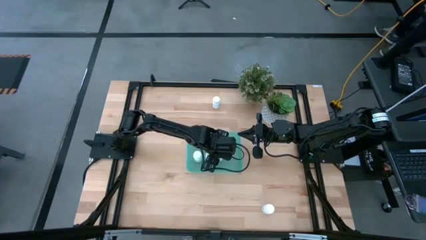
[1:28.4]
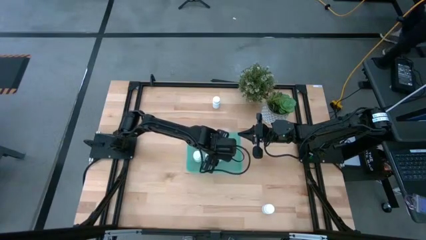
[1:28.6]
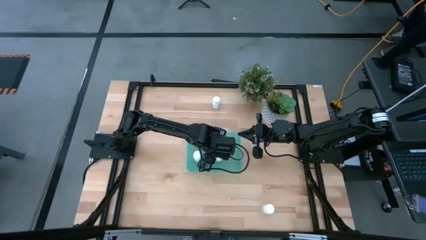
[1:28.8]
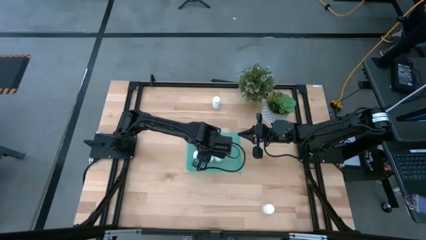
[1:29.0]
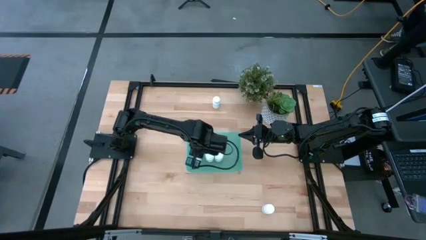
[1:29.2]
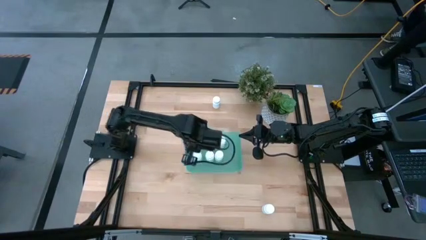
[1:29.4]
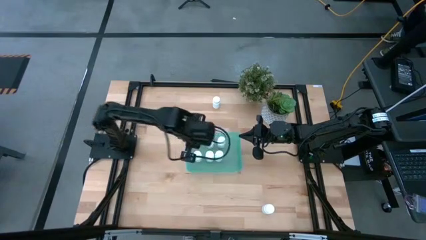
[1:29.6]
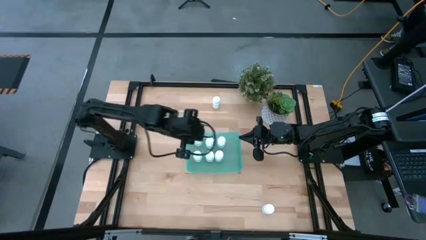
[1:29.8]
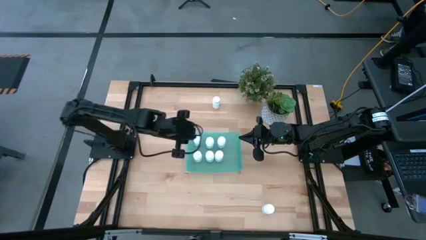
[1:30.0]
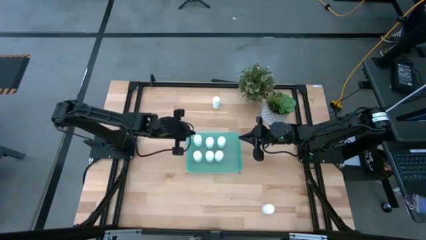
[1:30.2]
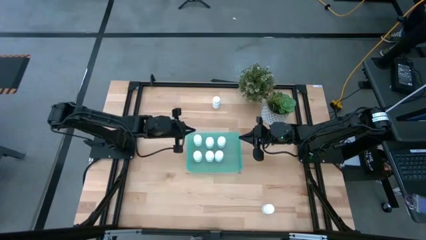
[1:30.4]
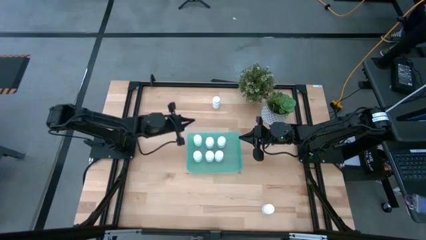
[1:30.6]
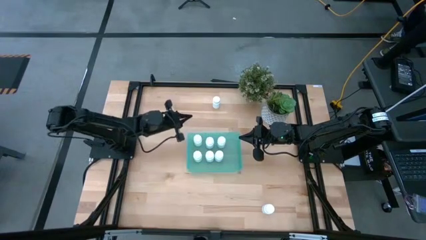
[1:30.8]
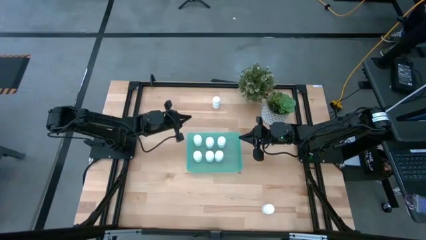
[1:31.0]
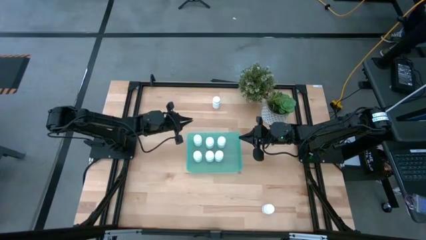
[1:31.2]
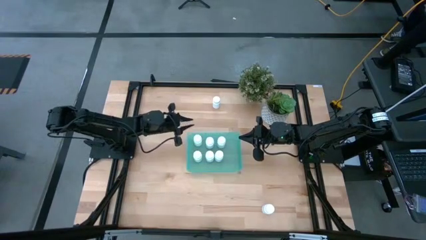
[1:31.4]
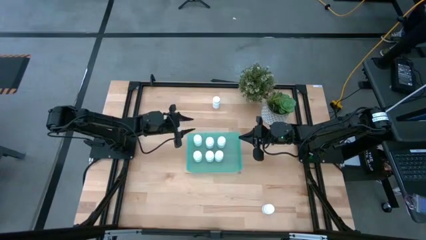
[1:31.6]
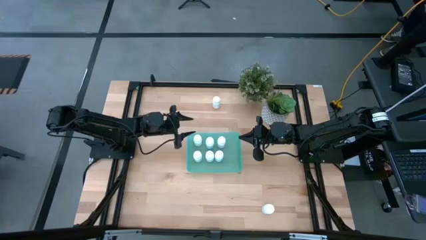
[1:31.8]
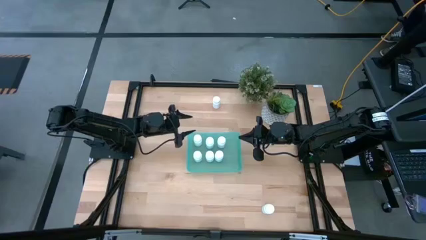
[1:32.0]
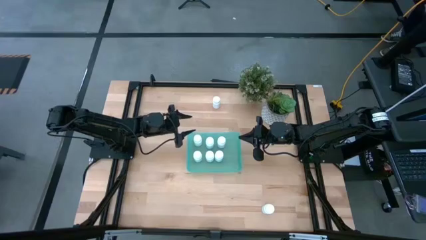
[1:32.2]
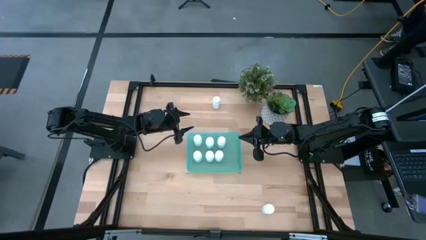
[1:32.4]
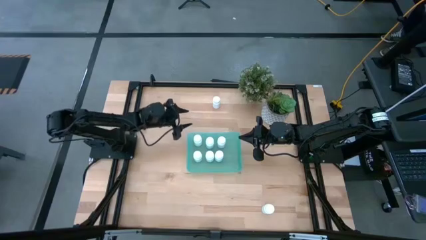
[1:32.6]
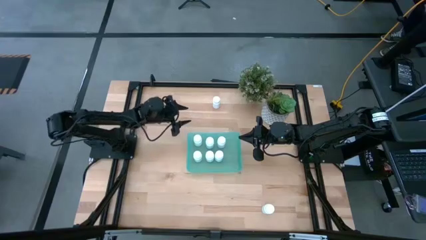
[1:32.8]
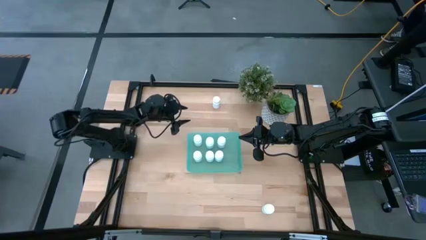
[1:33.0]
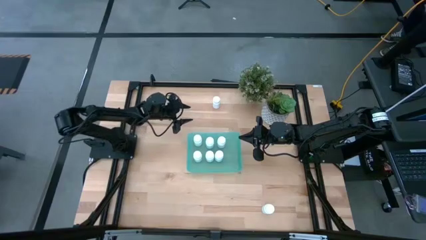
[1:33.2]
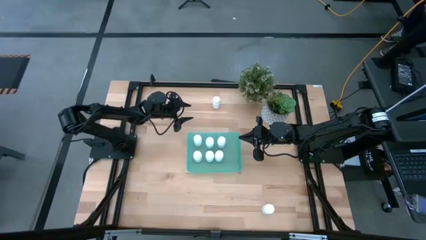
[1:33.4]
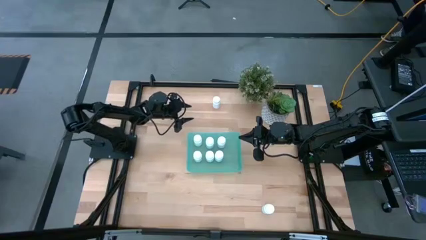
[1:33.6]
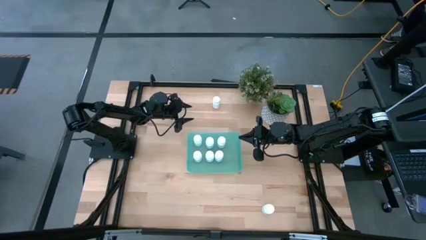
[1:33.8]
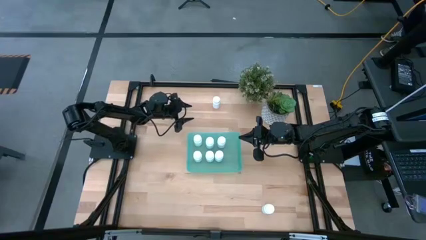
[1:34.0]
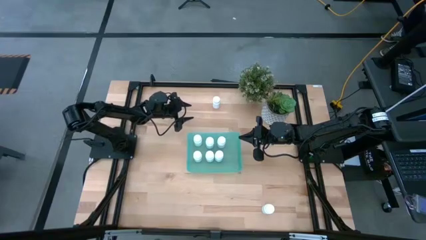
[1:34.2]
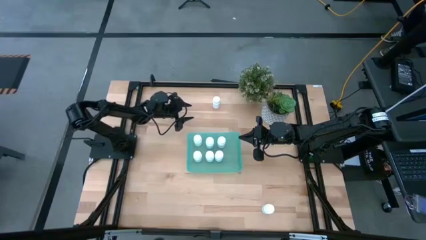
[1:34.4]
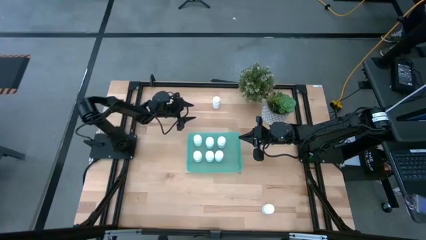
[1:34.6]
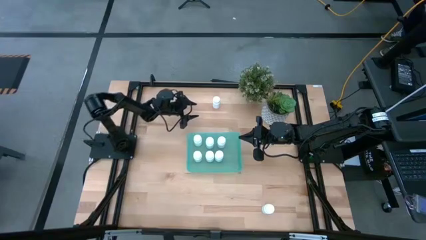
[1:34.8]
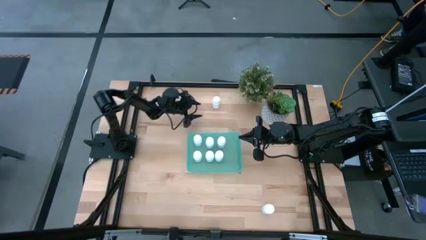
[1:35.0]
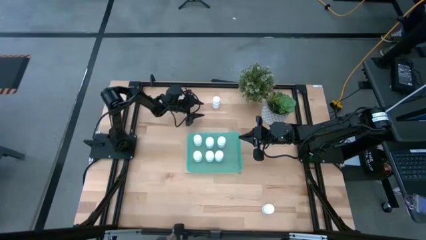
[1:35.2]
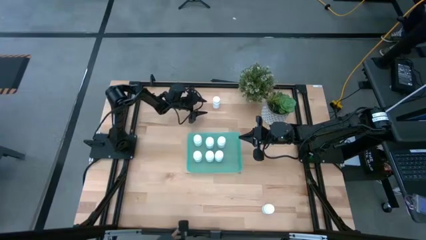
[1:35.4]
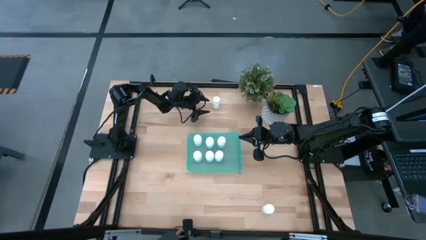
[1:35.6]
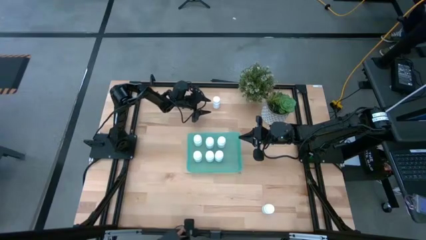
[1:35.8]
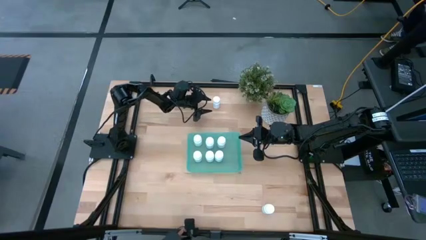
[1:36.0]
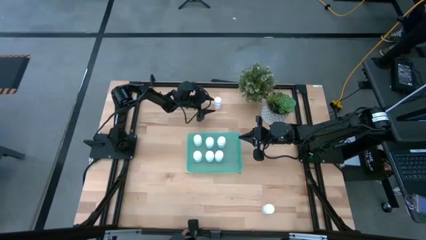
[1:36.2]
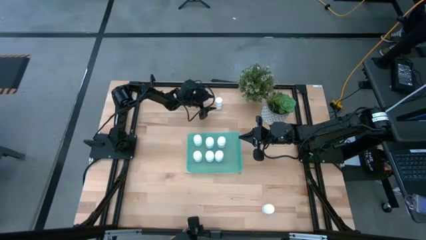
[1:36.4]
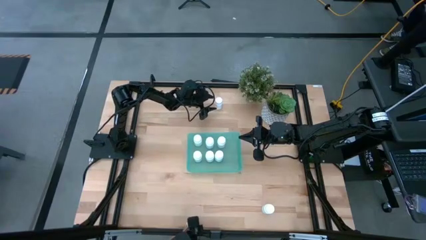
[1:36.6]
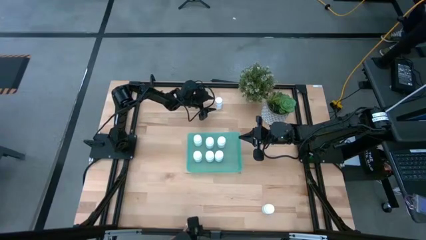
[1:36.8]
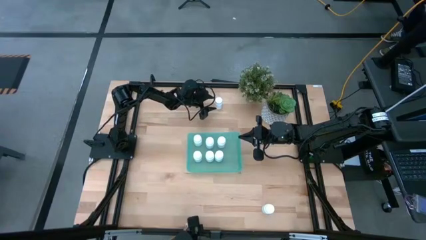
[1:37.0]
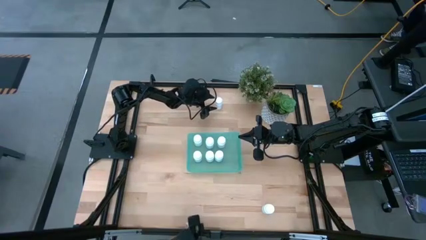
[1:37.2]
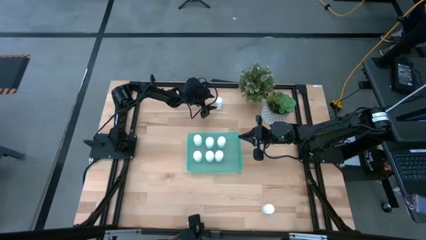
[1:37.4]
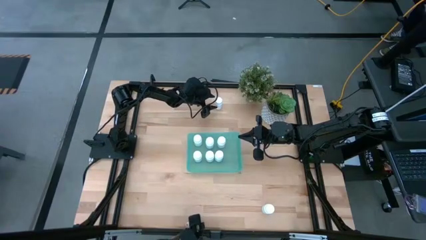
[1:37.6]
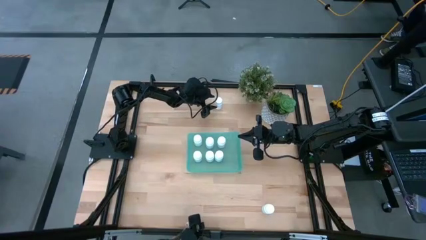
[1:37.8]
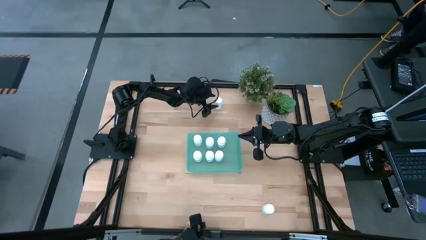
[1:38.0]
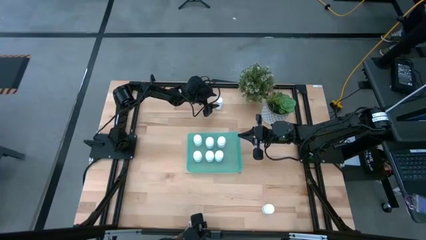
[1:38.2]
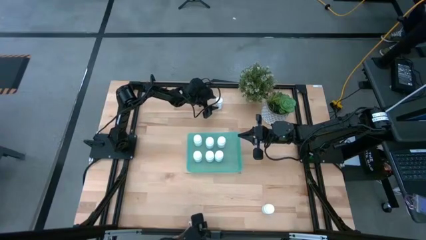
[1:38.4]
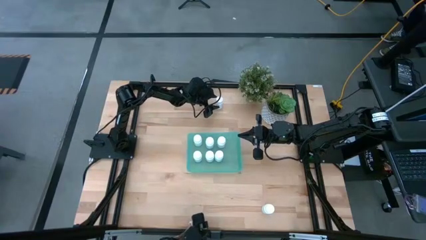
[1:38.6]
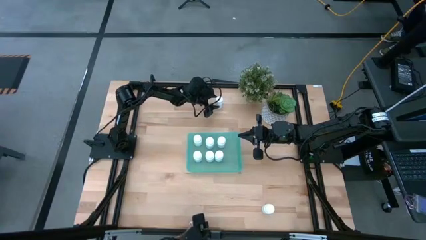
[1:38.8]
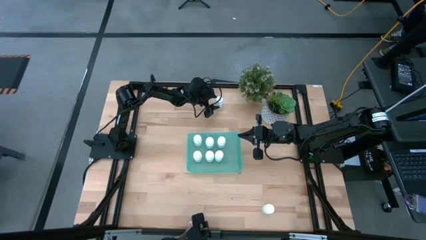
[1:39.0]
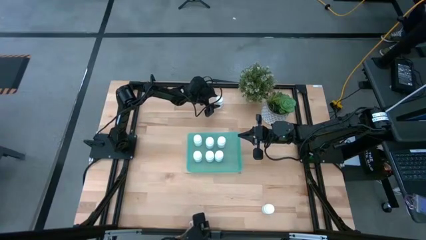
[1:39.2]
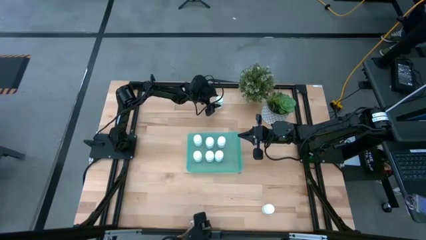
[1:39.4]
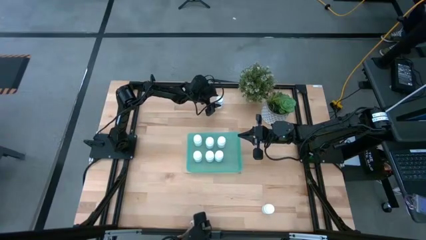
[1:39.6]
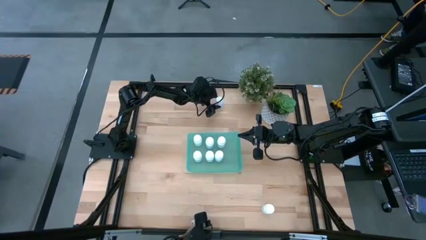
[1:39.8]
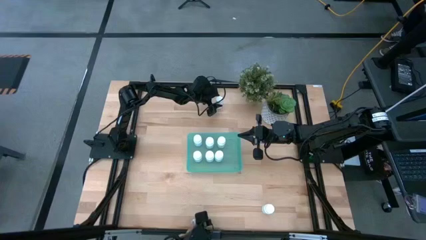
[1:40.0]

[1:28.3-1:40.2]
Task: Pick and place pill bottles into a basket
Put the white pill bottle into the blue bin

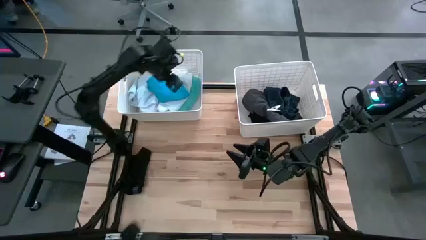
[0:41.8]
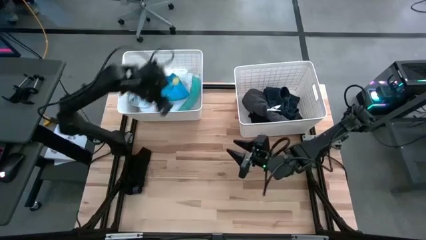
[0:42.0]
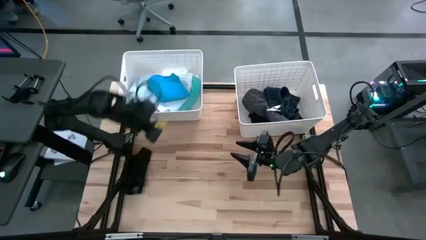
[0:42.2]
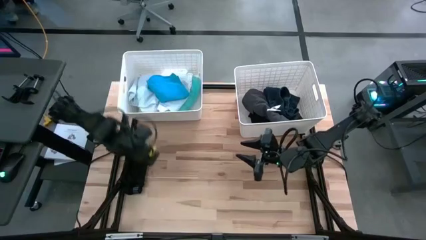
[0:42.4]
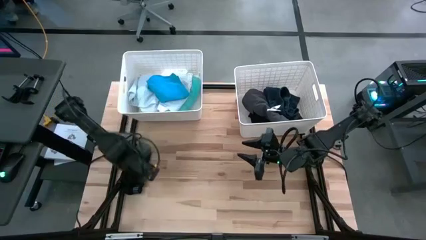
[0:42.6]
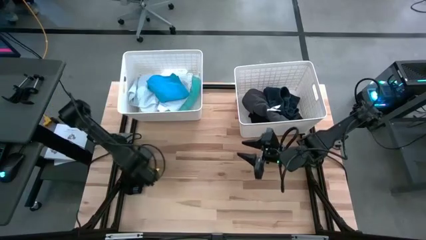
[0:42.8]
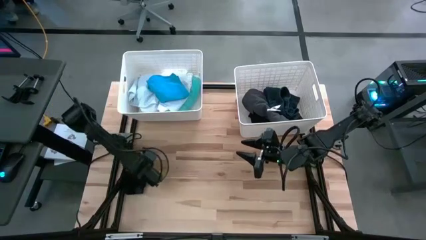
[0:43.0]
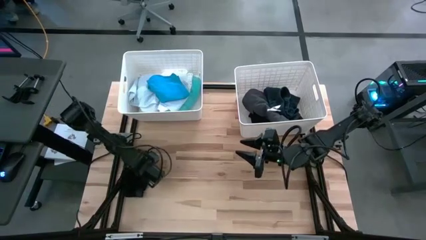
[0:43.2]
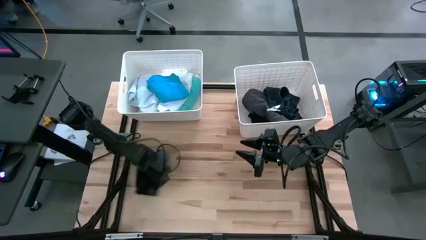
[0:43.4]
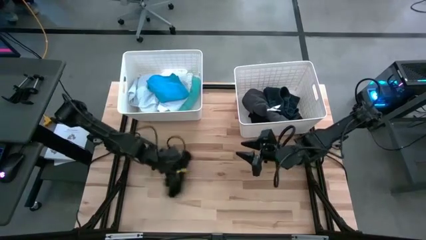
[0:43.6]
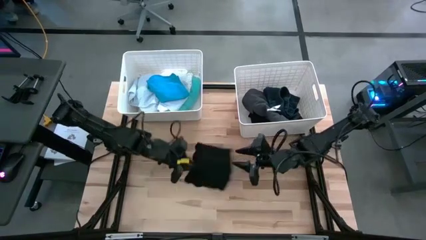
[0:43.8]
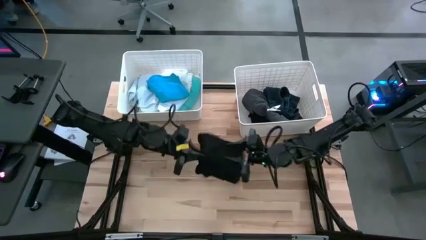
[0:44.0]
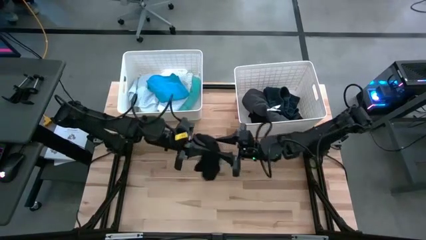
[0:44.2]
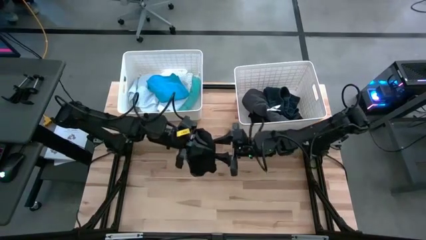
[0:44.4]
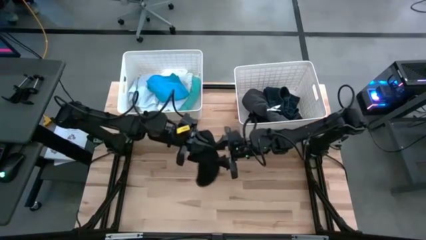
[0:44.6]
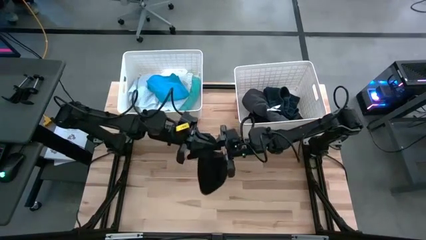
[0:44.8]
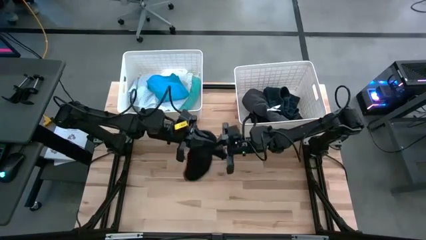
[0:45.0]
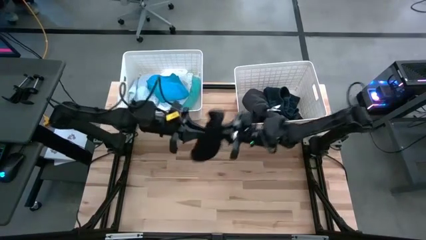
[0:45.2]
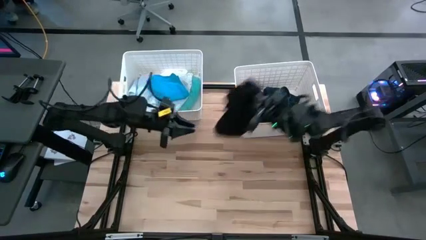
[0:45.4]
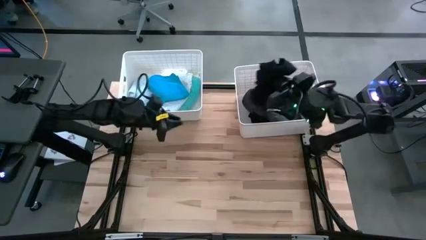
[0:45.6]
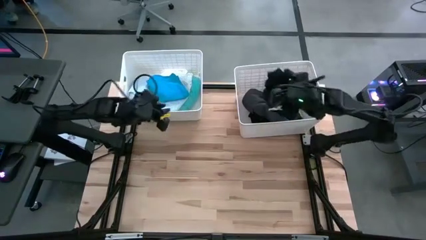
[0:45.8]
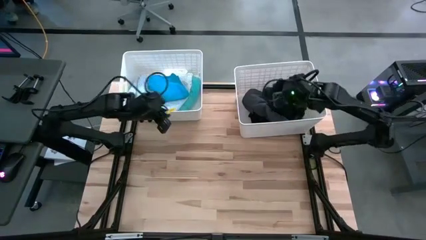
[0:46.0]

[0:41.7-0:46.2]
Task: Sort clothes
Put the black shorts into the right white bin

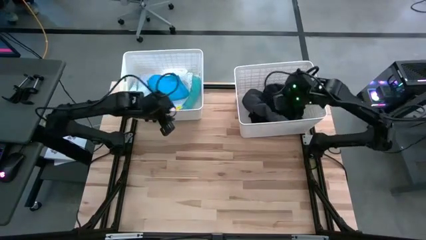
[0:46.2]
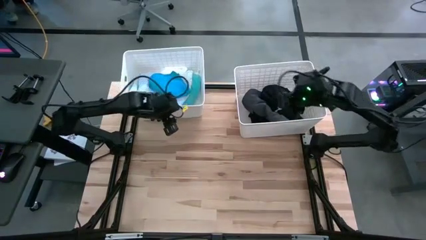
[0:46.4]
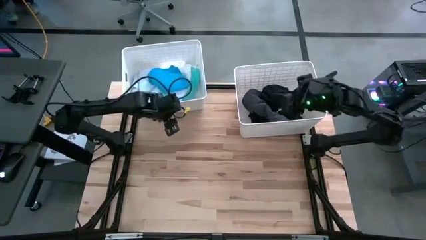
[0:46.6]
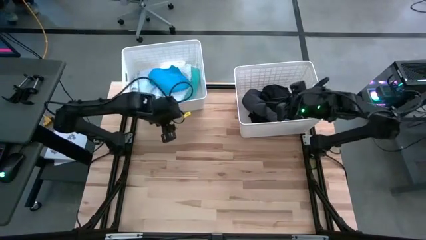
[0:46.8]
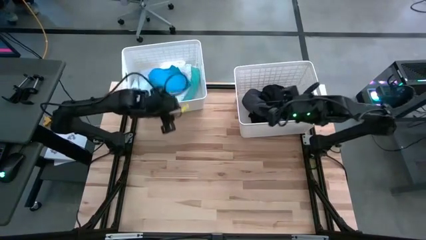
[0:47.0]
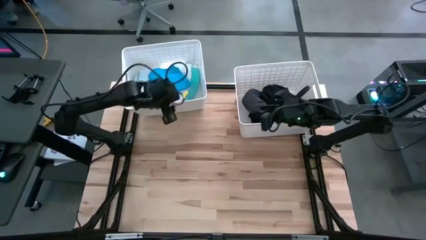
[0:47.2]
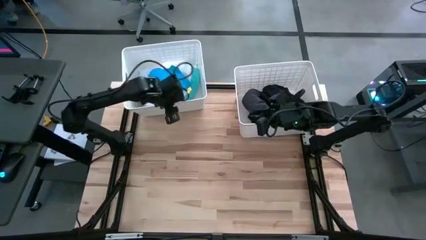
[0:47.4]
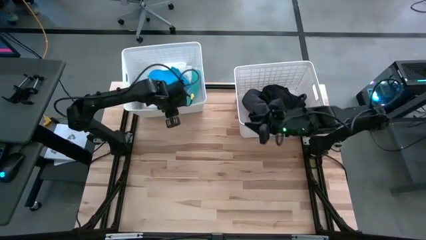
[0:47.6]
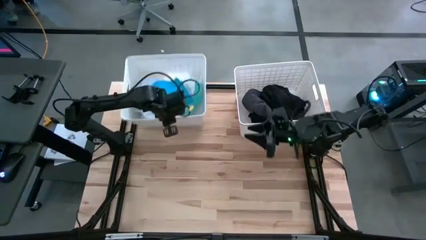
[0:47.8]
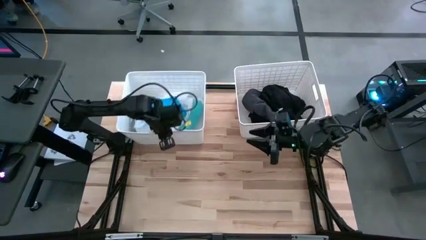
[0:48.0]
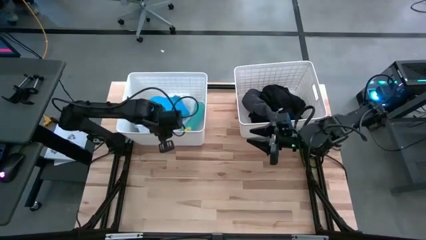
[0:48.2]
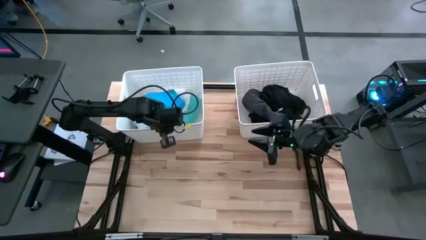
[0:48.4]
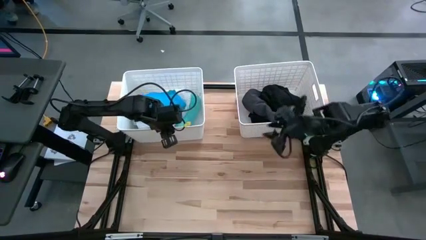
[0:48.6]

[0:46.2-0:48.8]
Move the left white bin to the upper left
